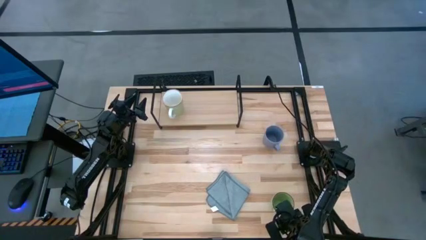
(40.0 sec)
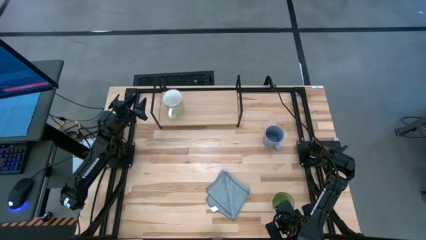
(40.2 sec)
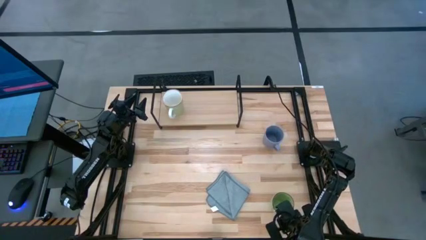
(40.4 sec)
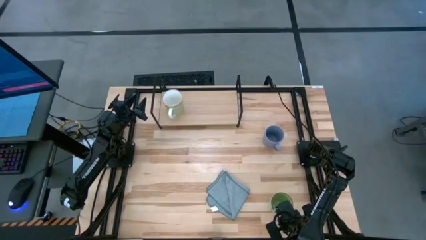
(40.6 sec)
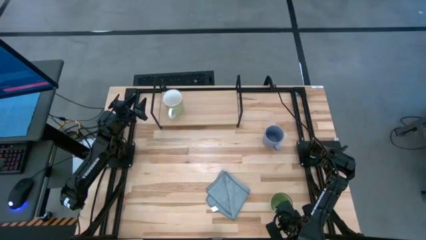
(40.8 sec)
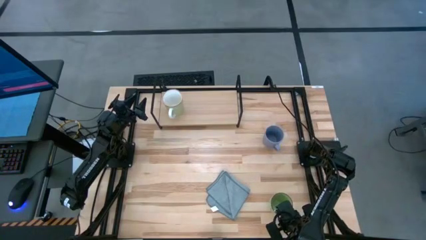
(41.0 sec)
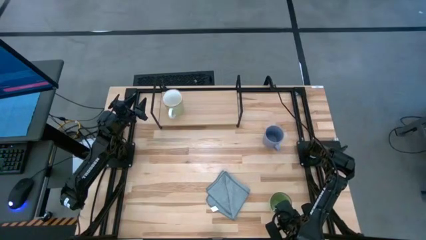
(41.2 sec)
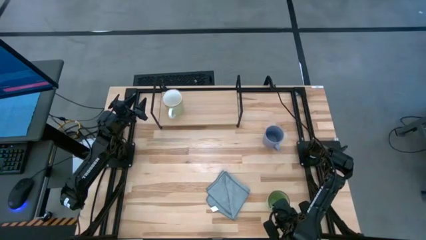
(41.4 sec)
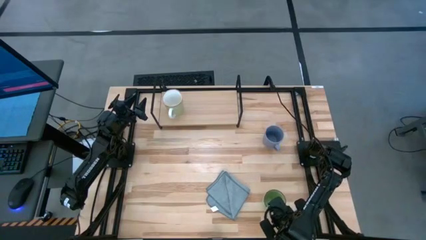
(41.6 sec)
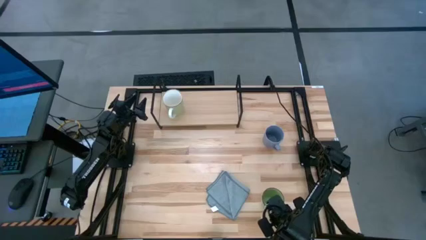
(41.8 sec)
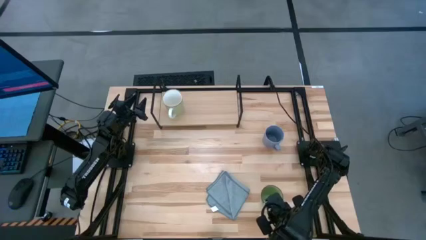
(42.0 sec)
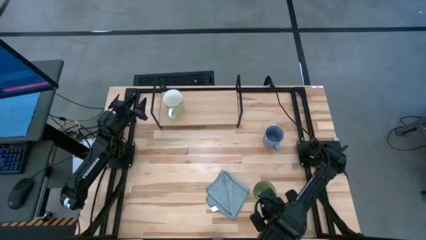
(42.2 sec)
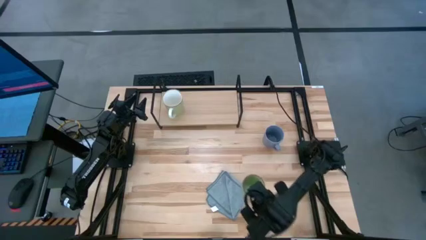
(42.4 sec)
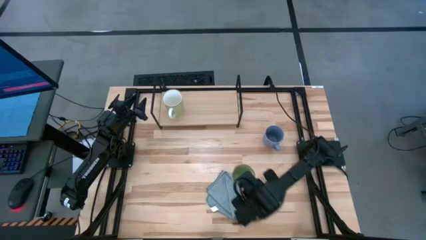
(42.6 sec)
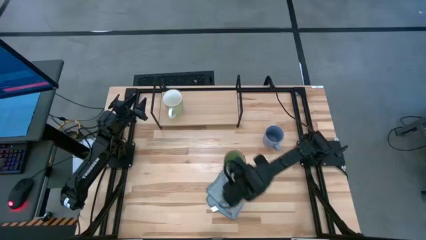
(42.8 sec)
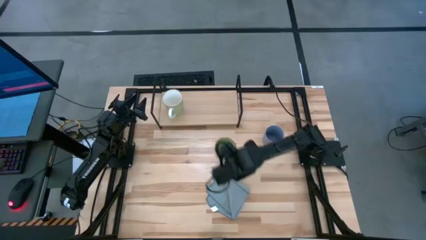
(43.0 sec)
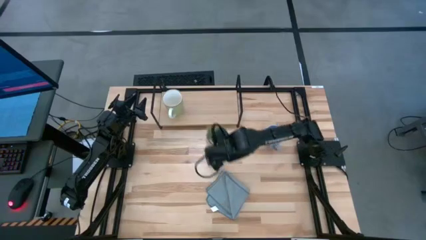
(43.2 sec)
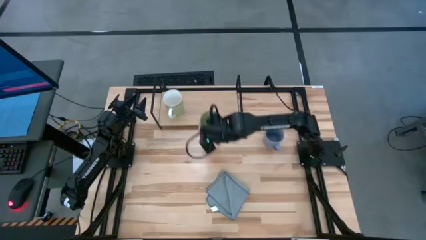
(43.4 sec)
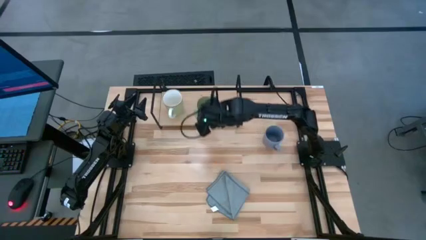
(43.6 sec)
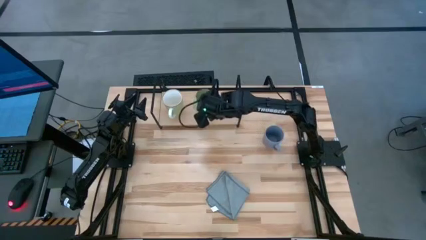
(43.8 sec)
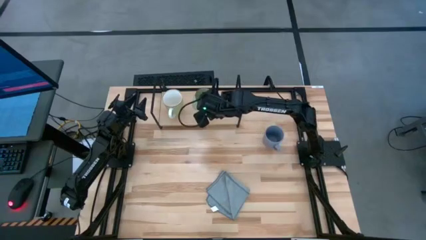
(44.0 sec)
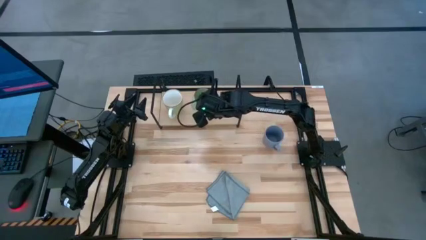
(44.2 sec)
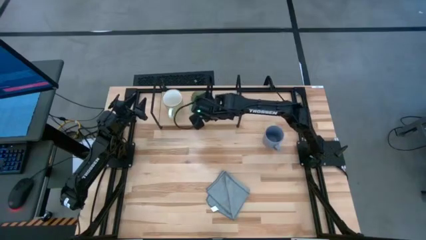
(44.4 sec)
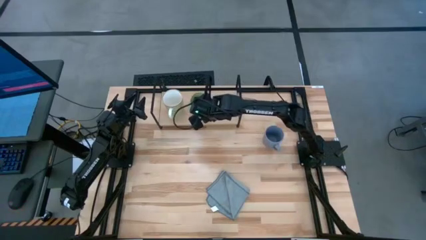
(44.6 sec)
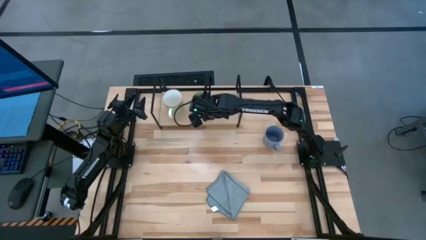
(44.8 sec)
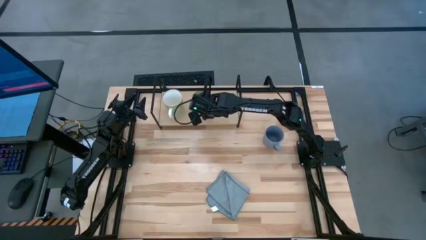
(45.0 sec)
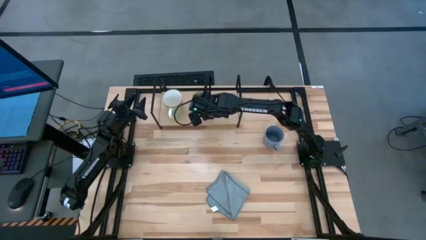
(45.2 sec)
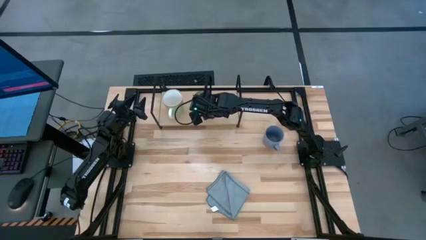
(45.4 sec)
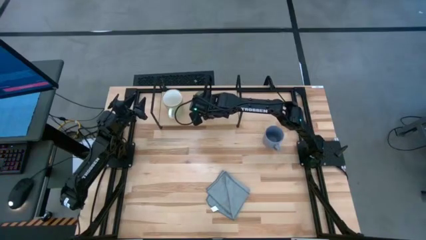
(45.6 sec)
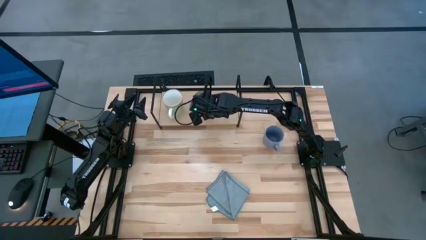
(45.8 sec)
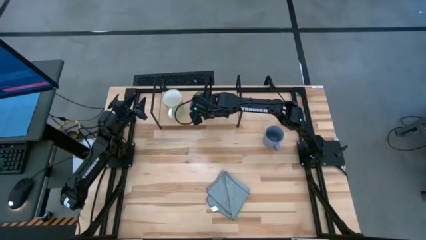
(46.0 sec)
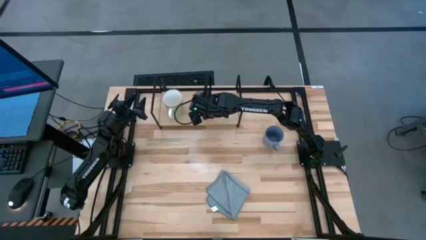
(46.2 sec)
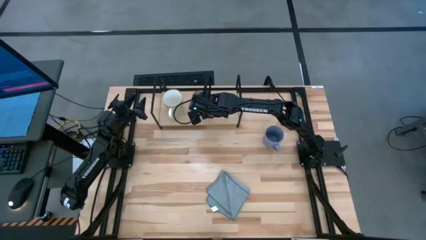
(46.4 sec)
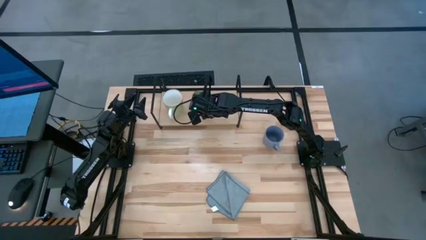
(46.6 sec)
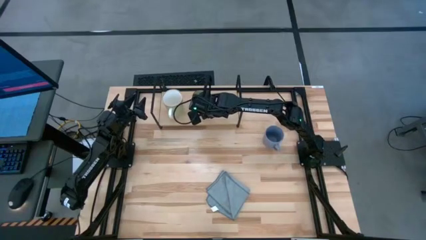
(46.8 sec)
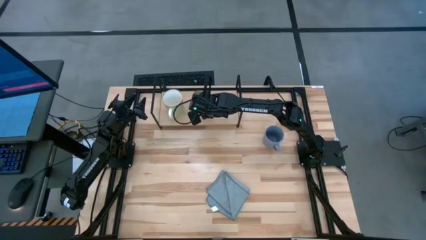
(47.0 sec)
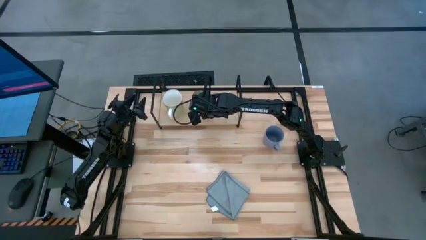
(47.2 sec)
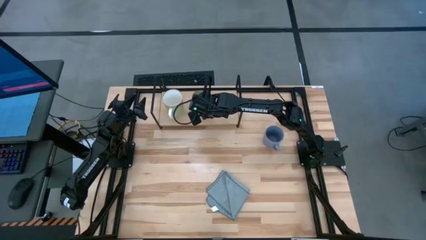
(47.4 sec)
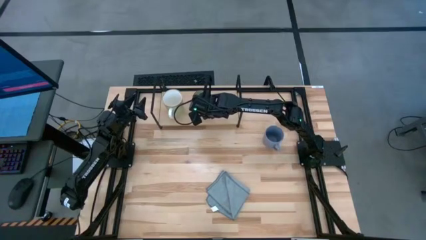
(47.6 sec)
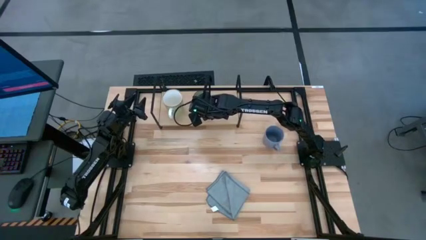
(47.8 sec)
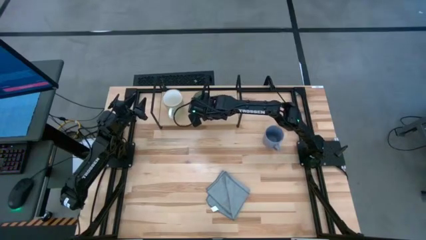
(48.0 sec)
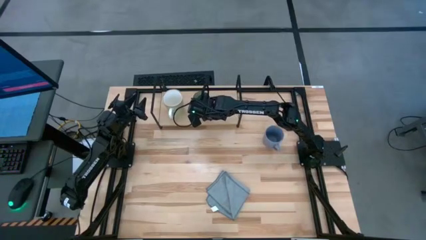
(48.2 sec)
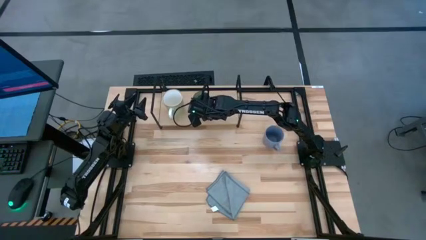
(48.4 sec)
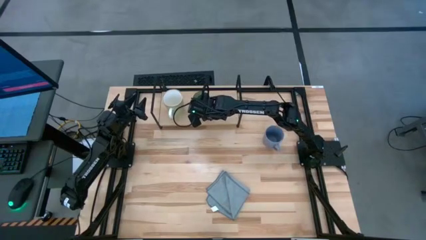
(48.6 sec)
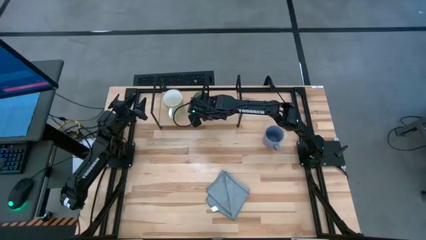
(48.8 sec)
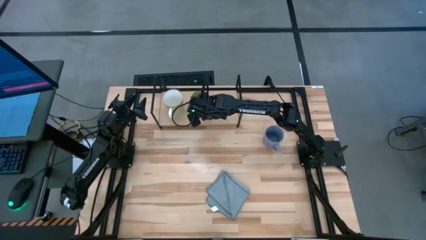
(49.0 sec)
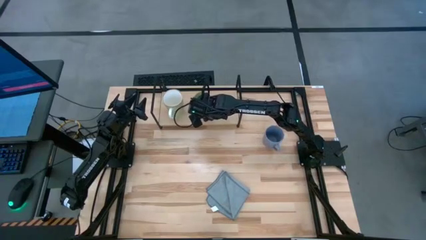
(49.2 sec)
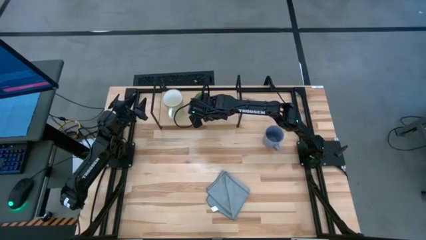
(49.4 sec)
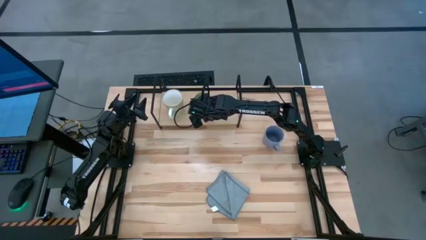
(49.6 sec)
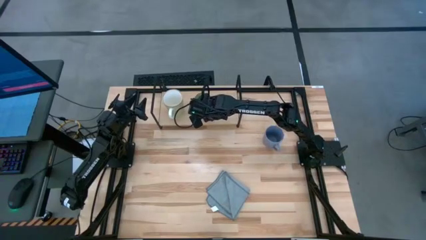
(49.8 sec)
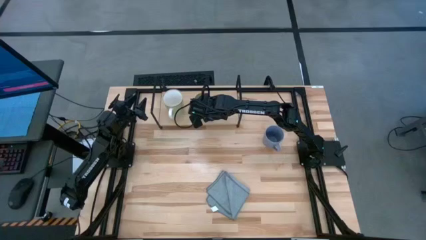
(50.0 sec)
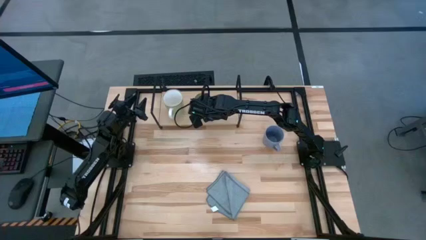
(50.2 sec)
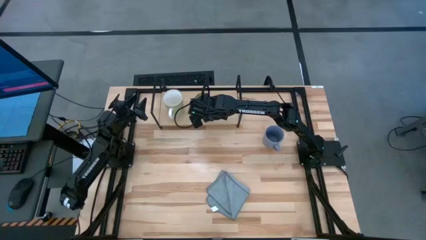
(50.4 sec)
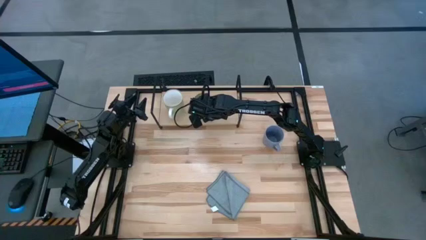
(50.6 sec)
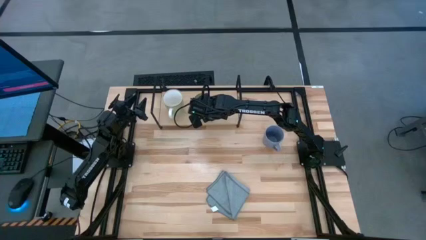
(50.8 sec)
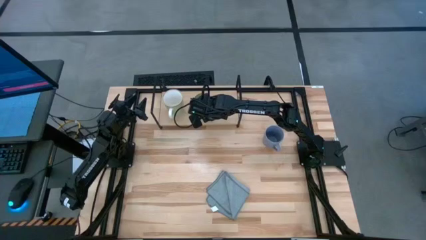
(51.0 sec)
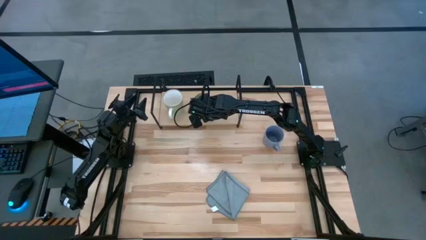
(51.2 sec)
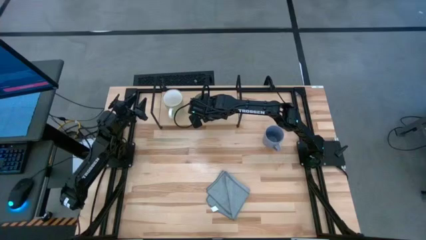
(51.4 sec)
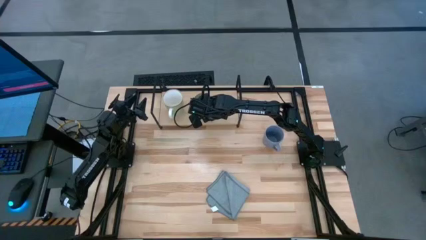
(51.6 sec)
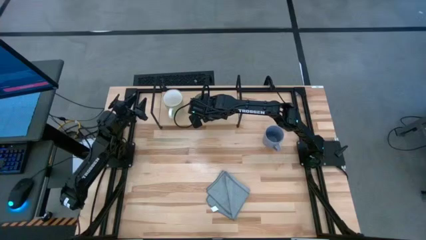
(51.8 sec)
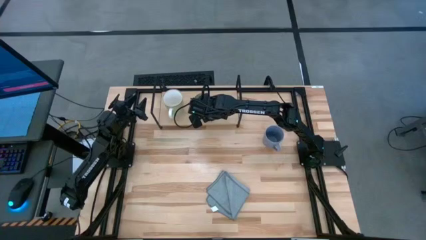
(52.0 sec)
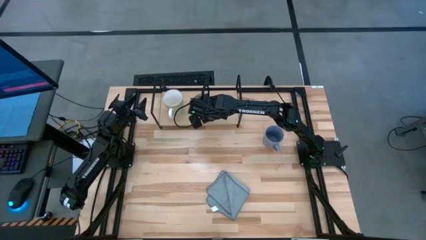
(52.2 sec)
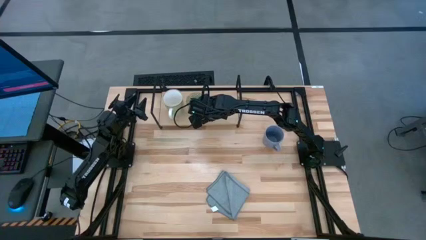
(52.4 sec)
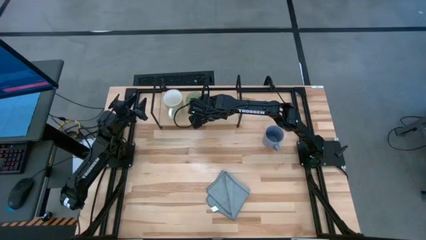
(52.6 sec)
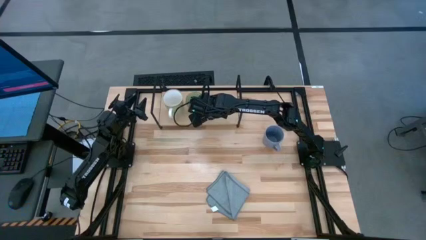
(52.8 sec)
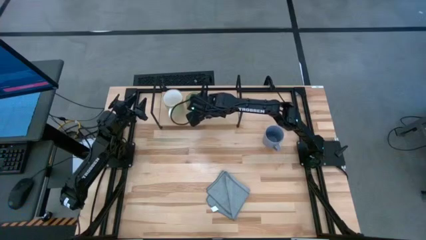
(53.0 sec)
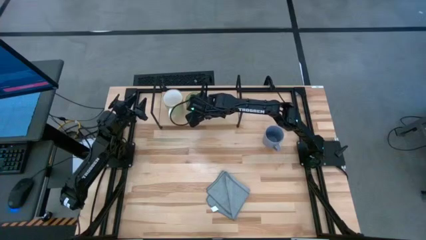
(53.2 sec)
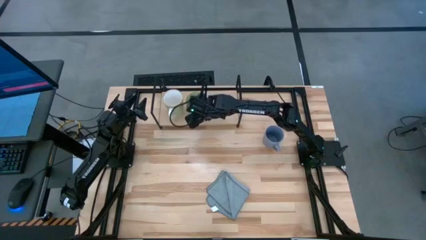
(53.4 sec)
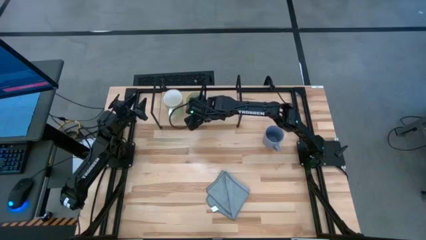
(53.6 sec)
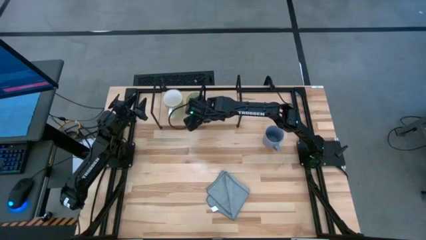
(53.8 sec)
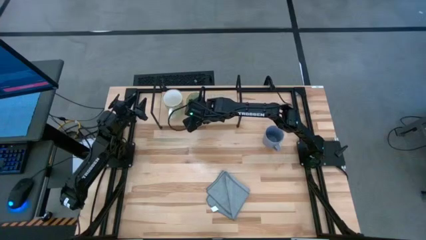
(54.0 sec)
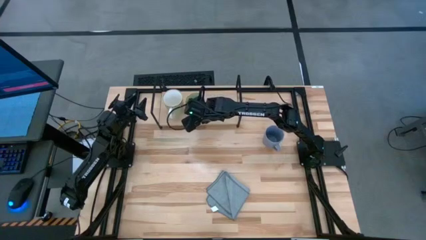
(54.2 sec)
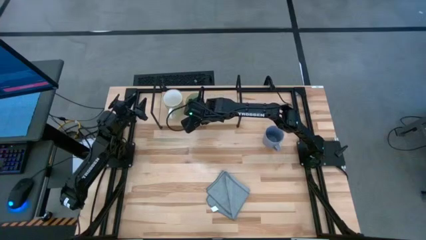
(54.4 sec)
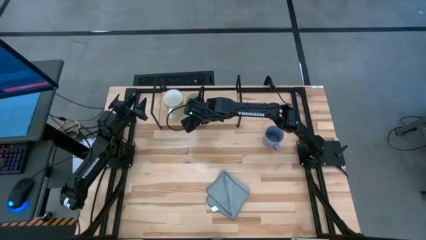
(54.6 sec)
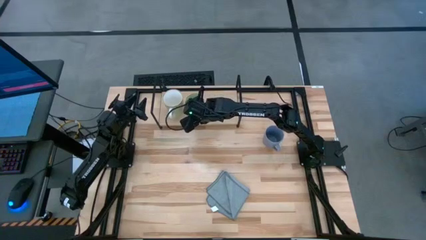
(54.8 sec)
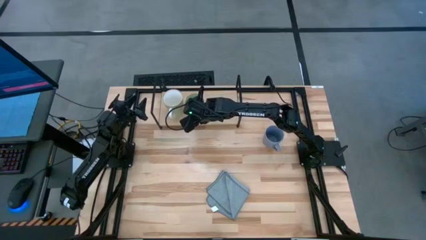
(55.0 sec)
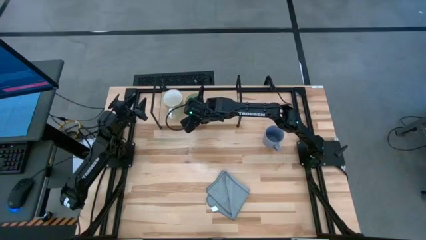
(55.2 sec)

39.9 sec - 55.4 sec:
Task: Stack small to large cups/mugs on shelf
Put the green mug with white handle on the shelf

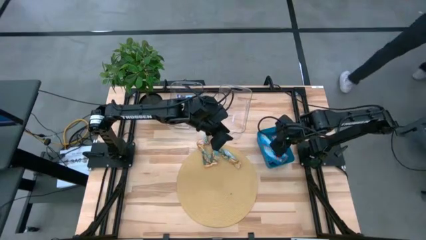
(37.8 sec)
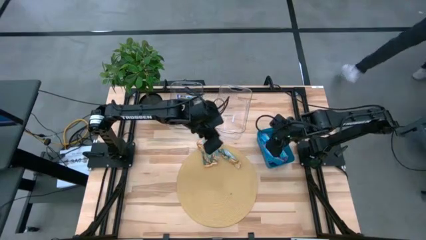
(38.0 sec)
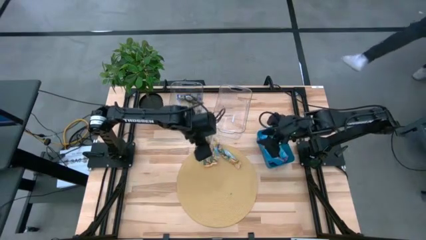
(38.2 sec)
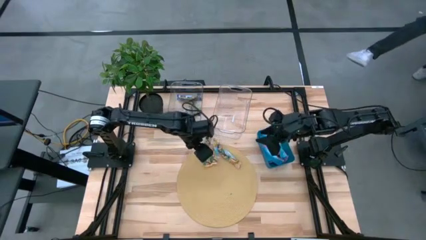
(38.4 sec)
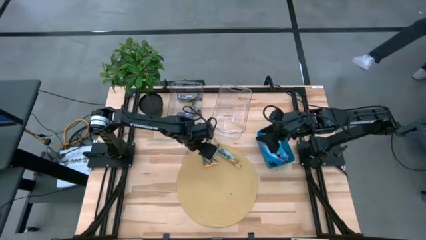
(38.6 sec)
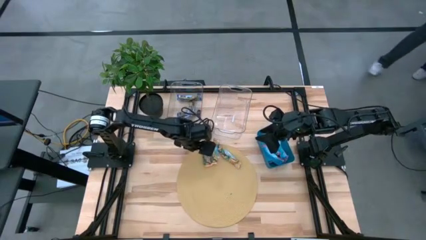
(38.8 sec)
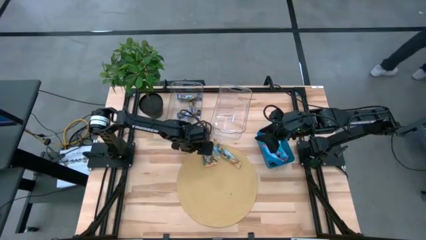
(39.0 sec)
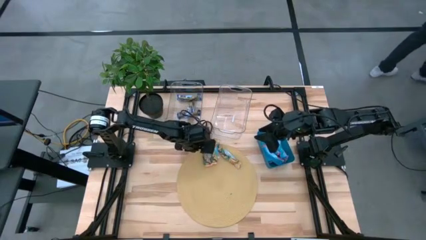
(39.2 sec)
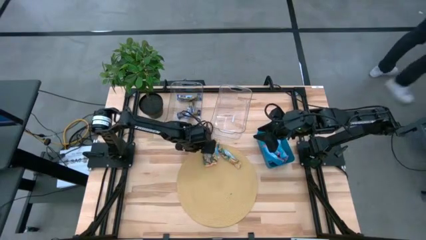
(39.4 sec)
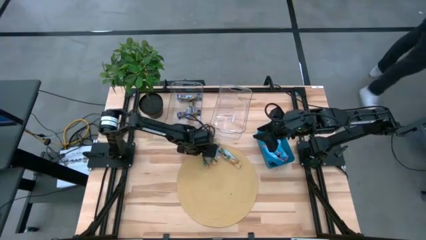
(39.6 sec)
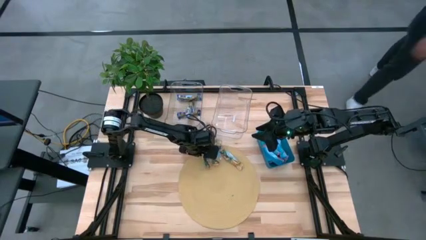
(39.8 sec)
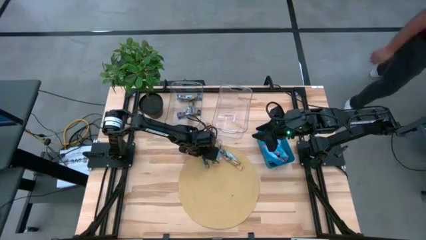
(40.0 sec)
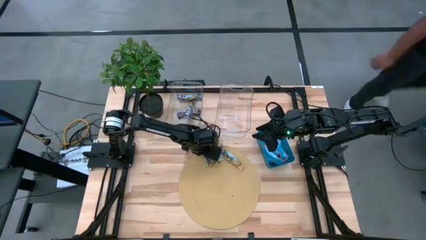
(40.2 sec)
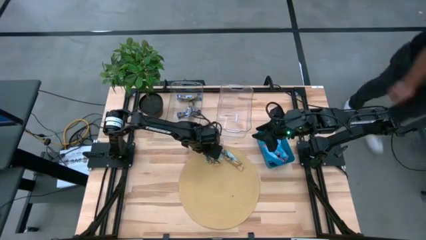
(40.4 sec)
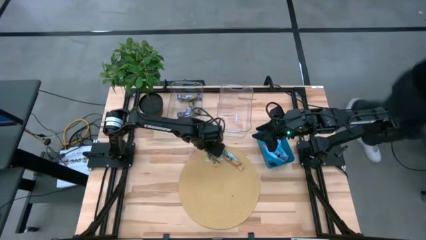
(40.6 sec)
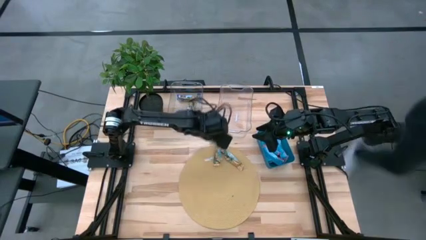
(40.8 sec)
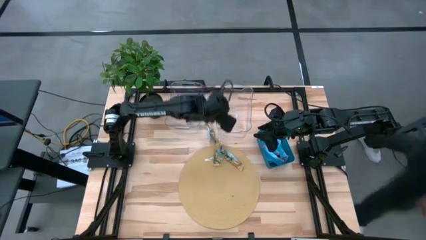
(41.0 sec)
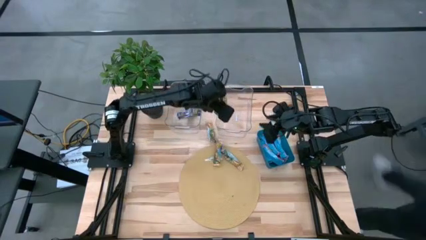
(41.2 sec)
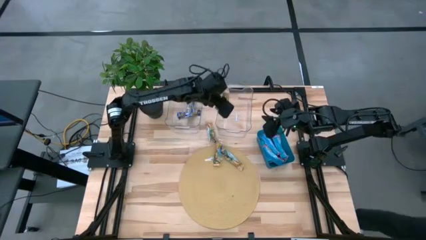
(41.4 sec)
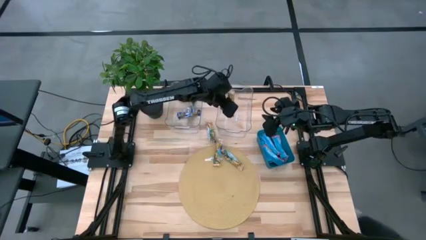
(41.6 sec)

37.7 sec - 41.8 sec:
Task: Pick and place Granola Bars by type
Put the yellow granola bar into the right transparent bin
